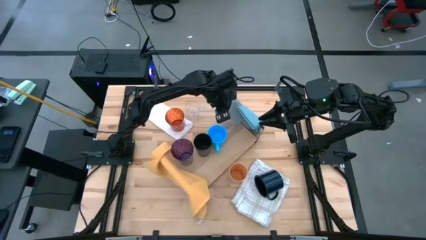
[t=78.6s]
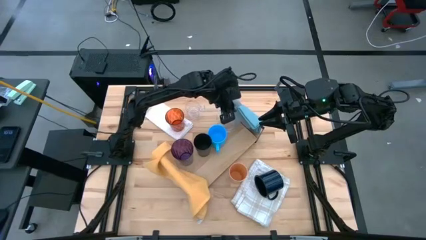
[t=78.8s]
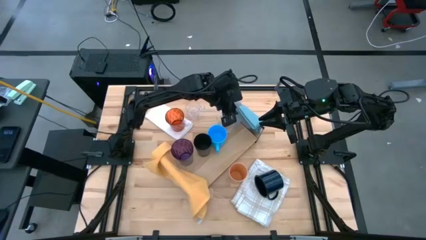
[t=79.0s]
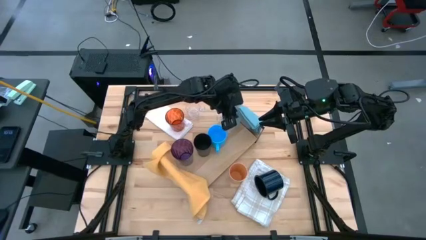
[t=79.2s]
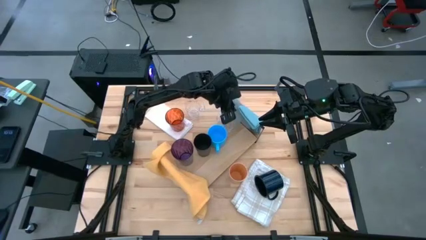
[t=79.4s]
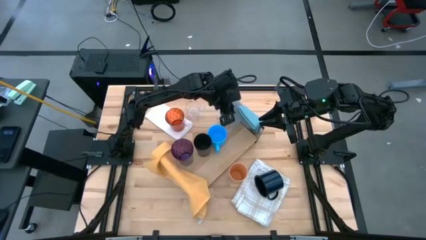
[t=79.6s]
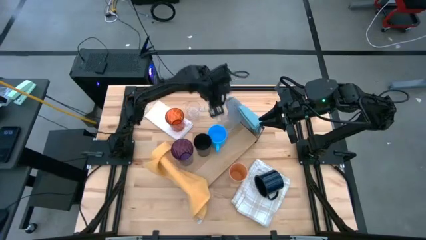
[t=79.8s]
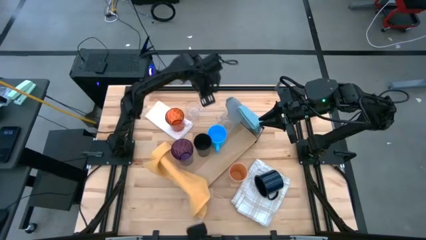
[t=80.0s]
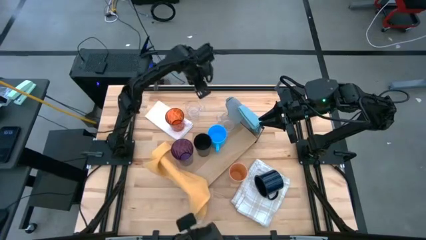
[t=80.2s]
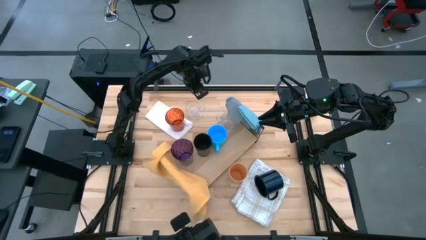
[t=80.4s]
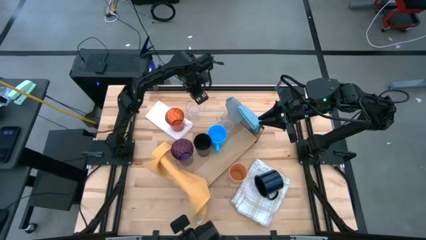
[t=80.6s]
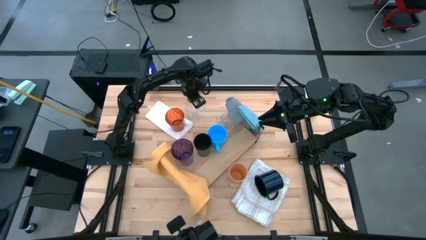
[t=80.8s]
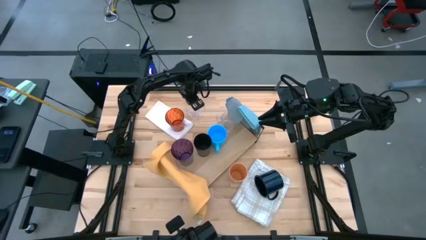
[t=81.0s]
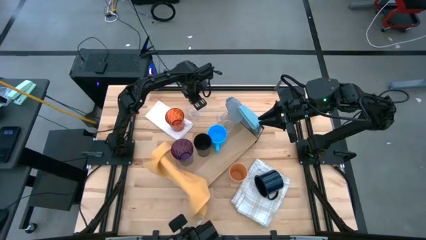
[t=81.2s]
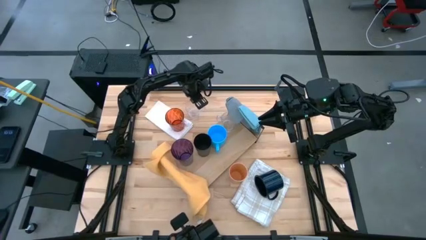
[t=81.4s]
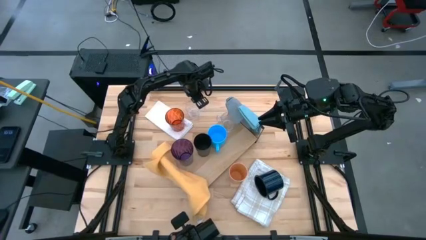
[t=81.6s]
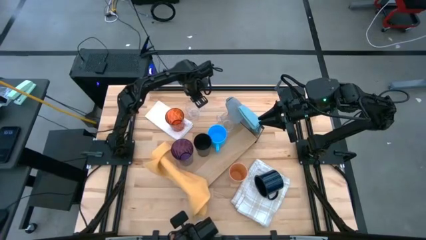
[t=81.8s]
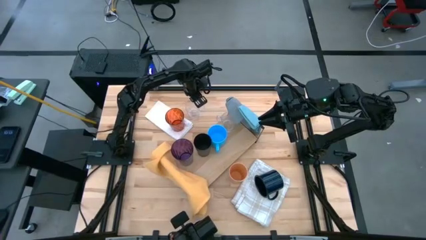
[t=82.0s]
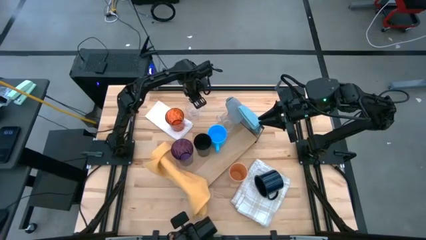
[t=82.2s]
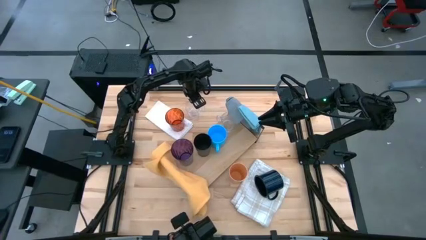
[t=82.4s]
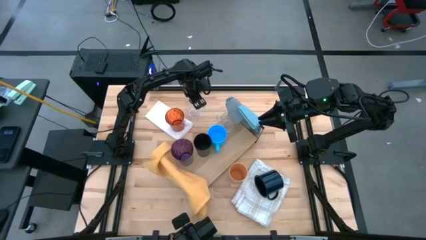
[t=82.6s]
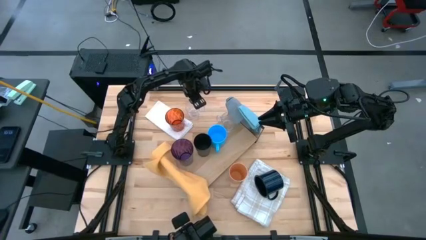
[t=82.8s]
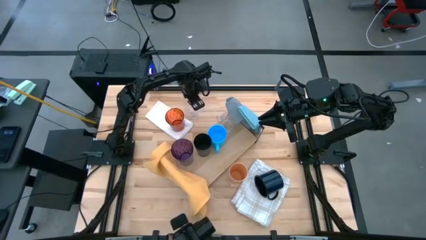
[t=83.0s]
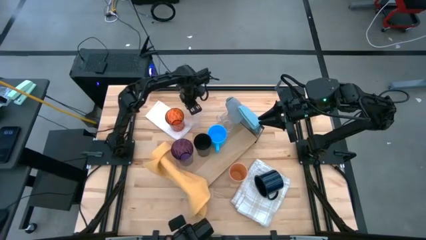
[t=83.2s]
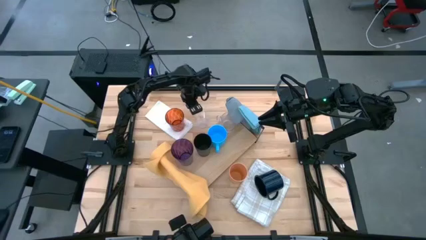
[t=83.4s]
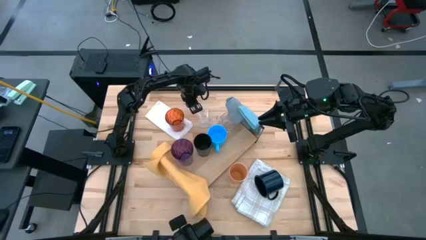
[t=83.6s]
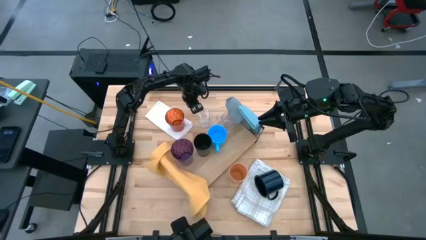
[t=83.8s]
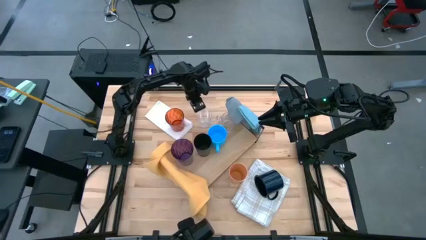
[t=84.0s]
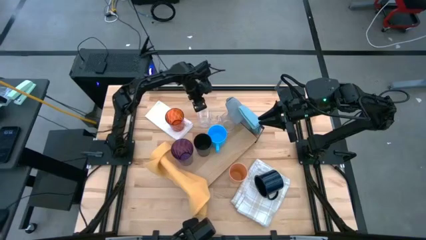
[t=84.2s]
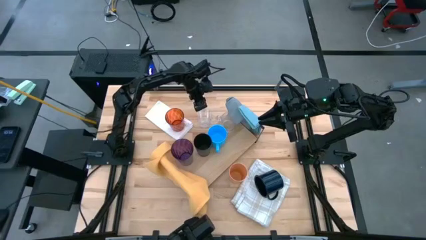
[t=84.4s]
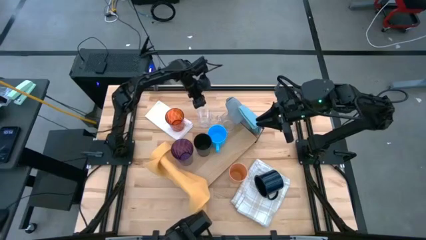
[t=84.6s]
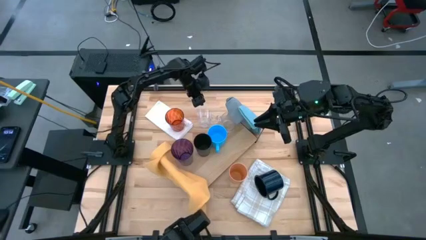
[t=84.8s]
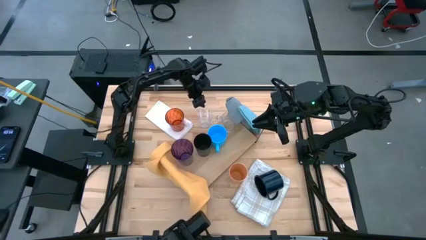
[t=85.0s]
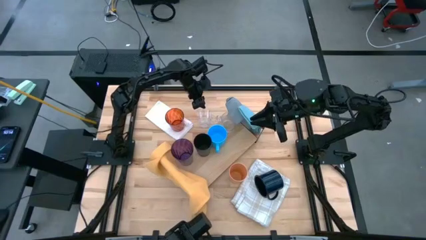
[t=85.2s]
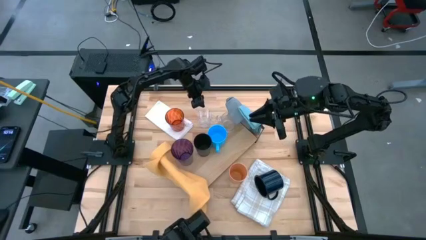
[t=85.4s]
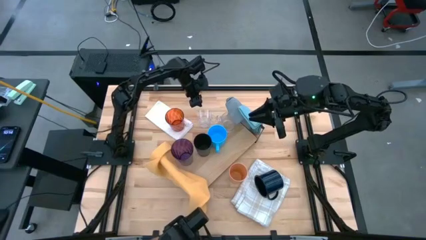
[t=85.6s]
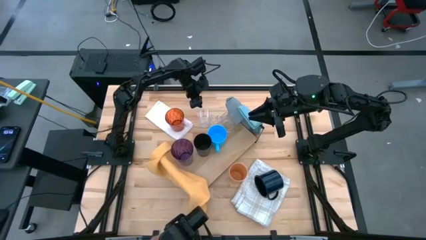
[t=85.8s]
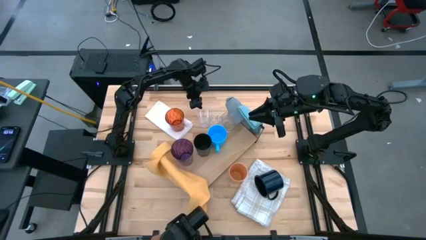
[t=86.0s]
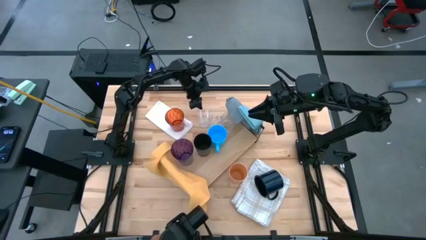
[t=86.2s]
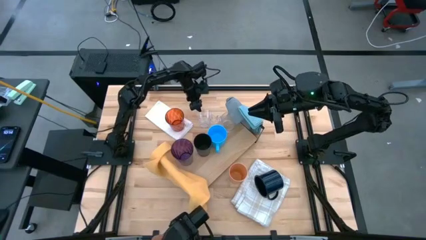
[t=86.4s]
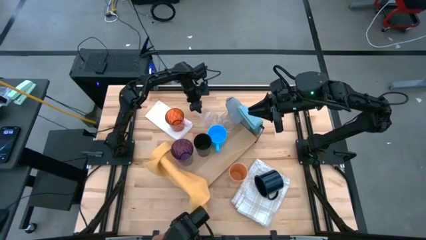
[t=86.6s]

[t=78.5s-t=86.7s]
Task: Stack small to large cups/mugs on shelf
Put the transparent mug on the shelf
